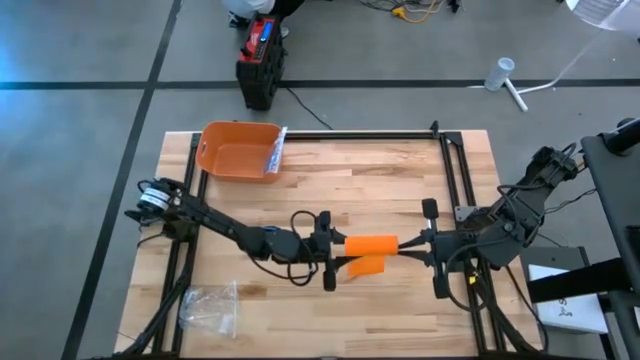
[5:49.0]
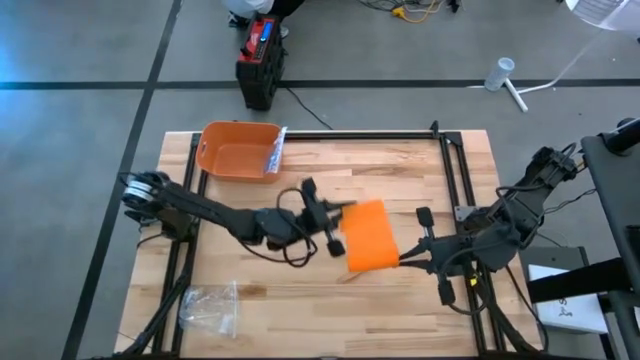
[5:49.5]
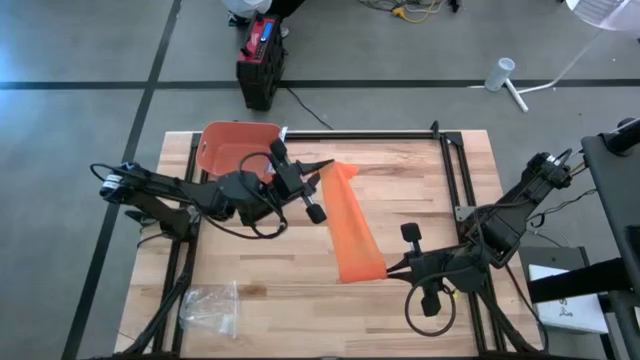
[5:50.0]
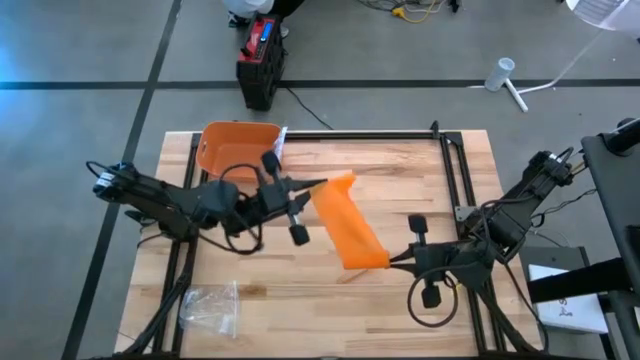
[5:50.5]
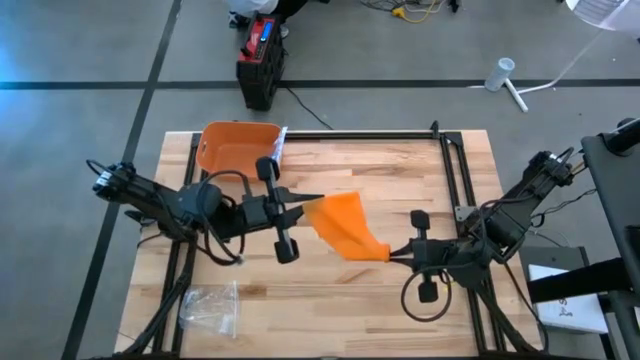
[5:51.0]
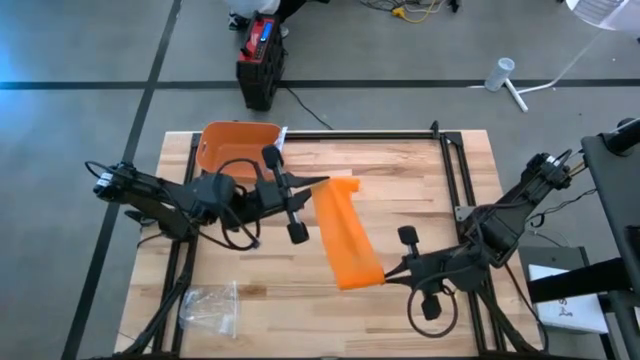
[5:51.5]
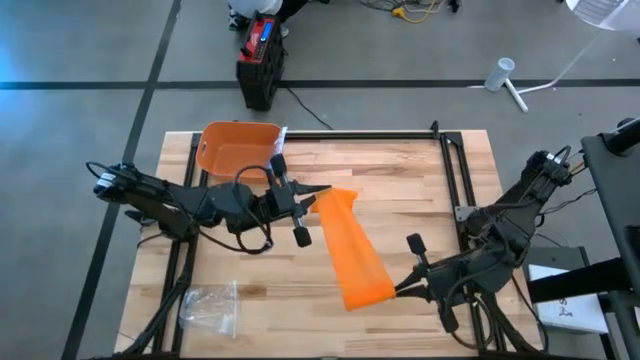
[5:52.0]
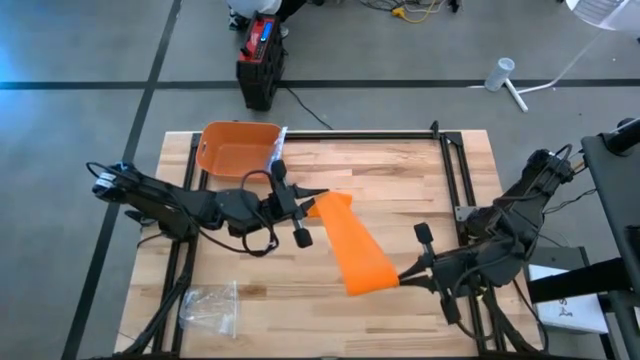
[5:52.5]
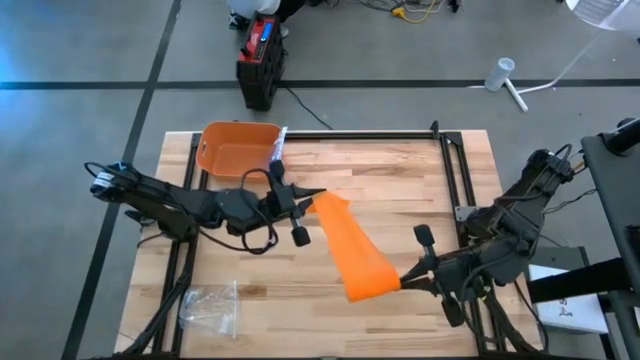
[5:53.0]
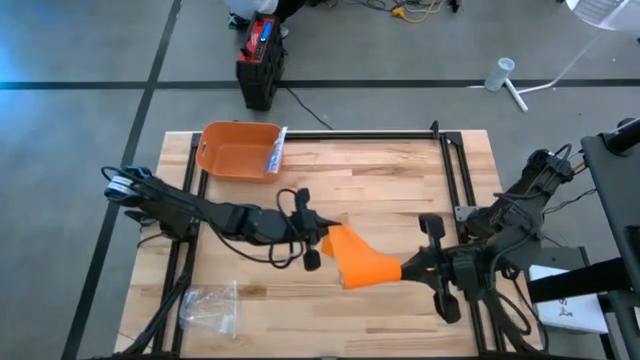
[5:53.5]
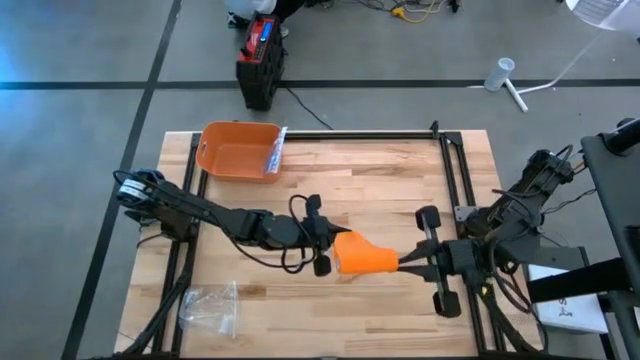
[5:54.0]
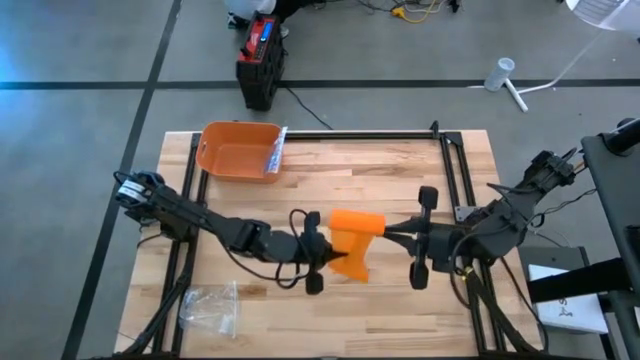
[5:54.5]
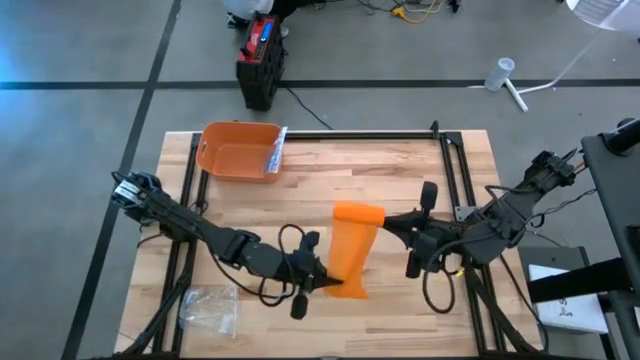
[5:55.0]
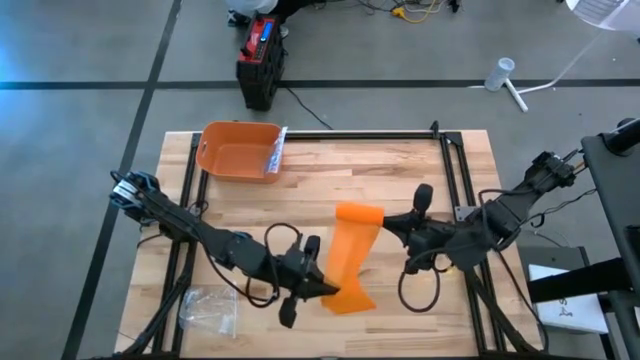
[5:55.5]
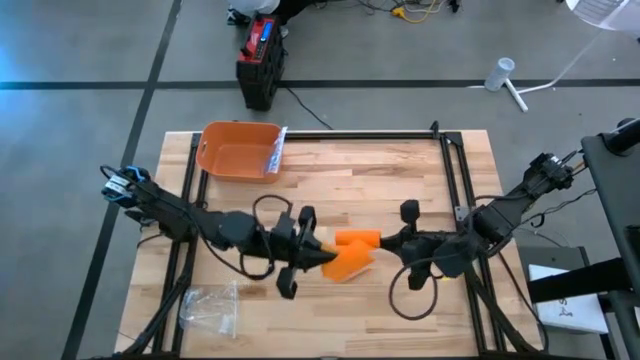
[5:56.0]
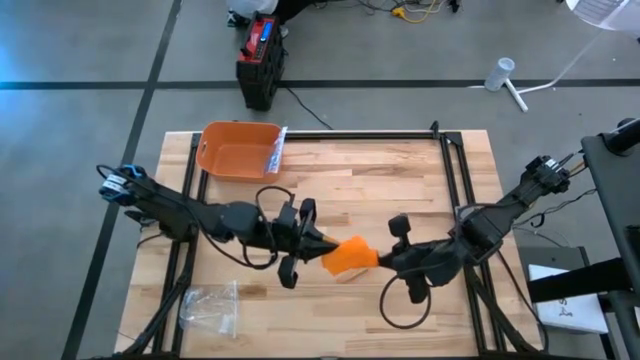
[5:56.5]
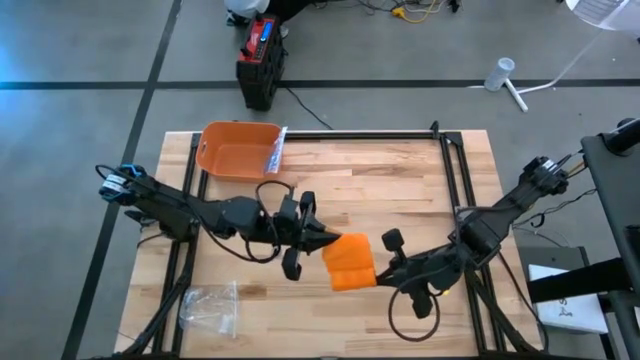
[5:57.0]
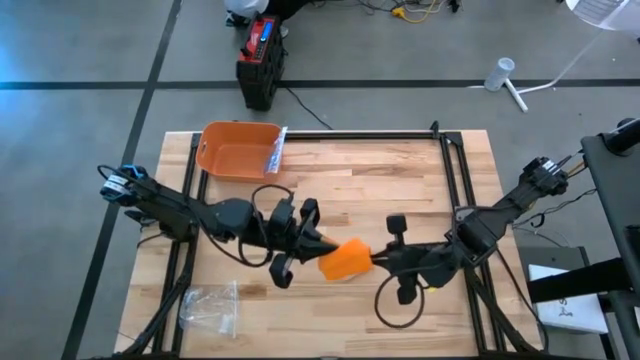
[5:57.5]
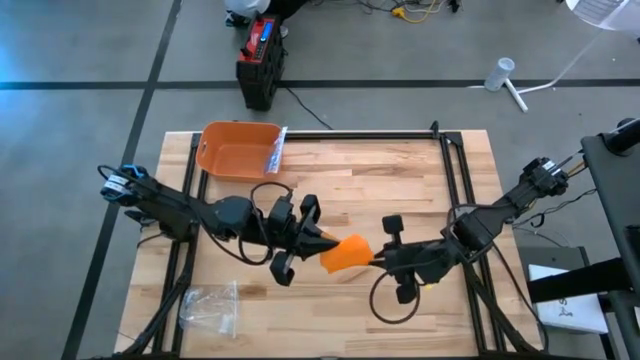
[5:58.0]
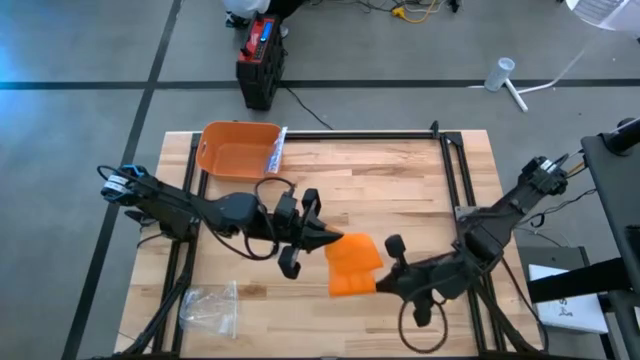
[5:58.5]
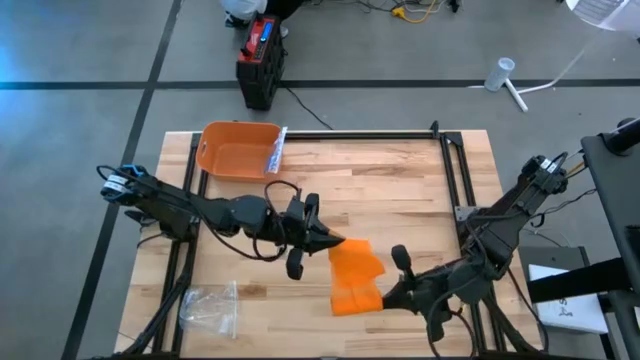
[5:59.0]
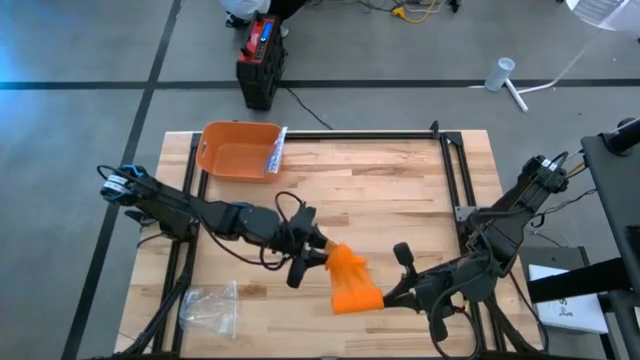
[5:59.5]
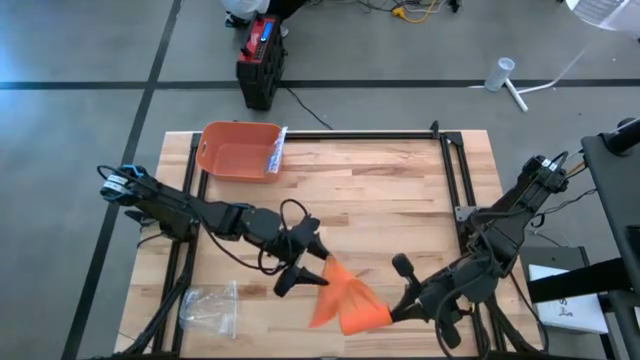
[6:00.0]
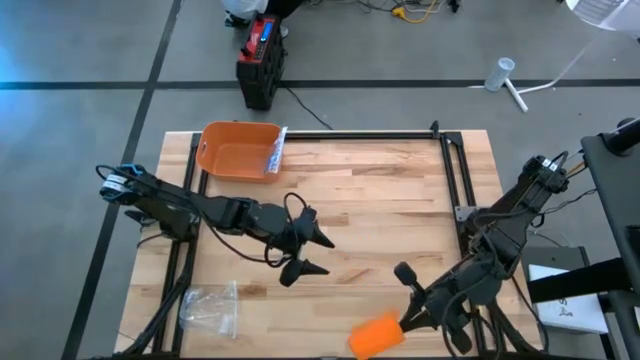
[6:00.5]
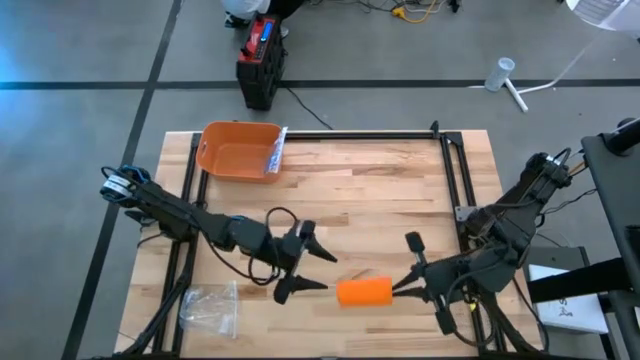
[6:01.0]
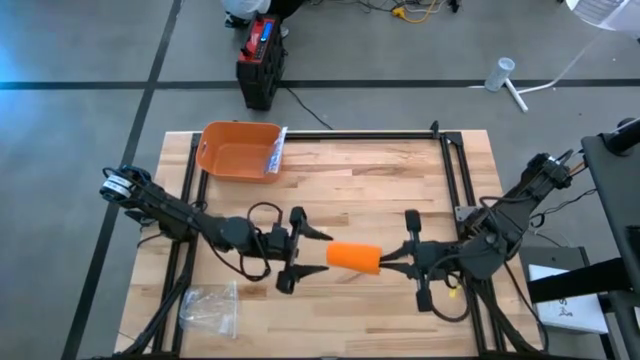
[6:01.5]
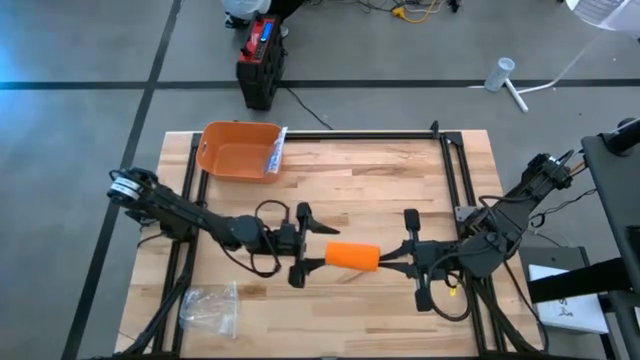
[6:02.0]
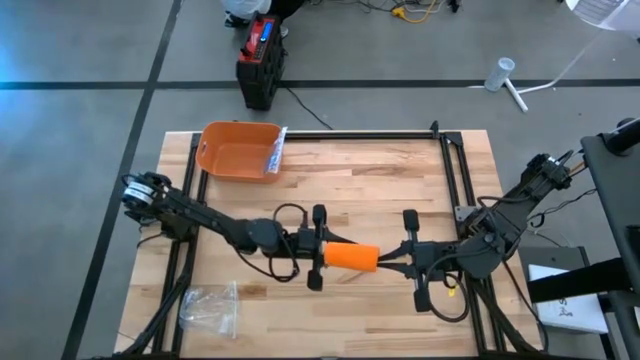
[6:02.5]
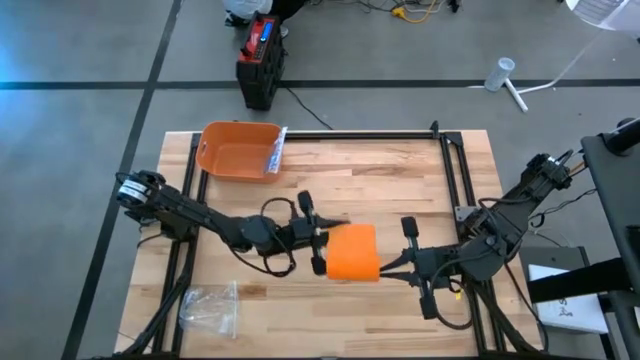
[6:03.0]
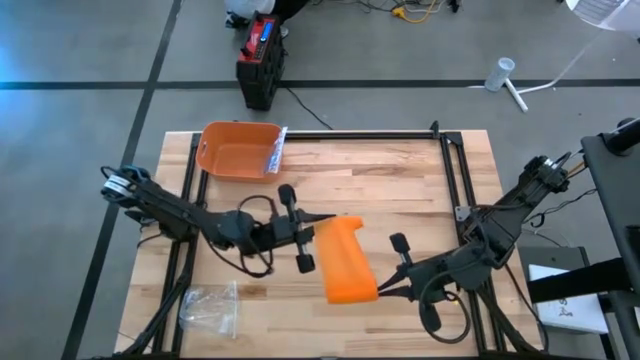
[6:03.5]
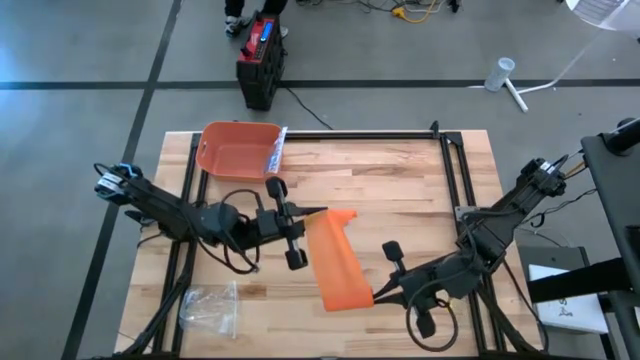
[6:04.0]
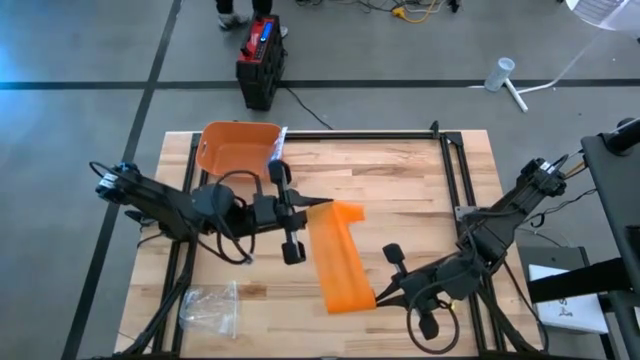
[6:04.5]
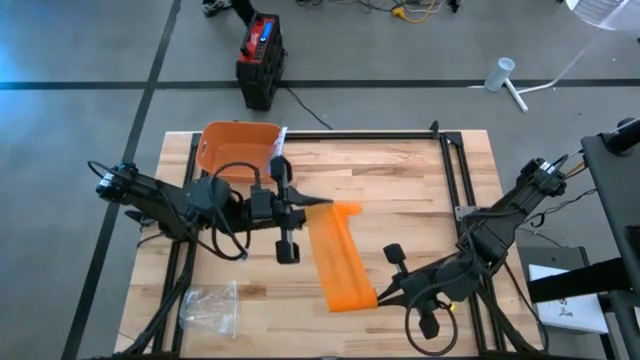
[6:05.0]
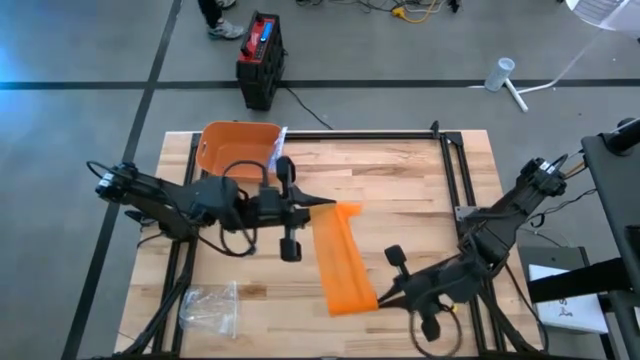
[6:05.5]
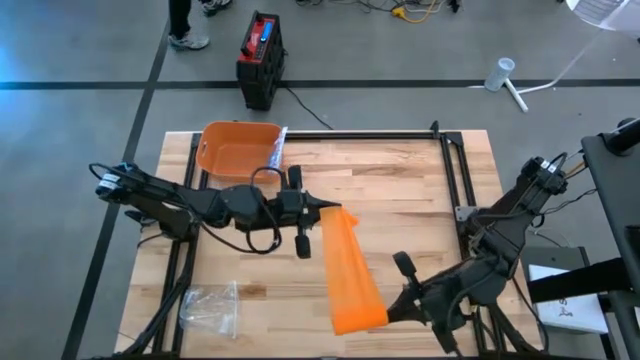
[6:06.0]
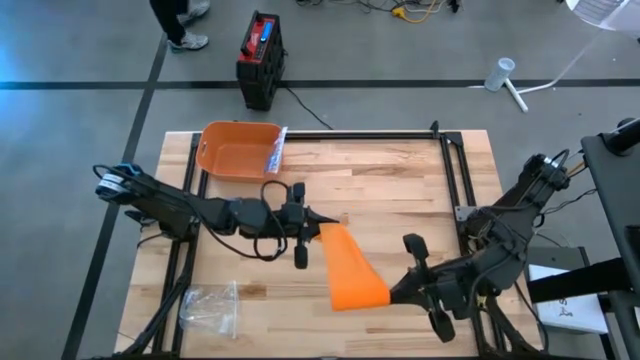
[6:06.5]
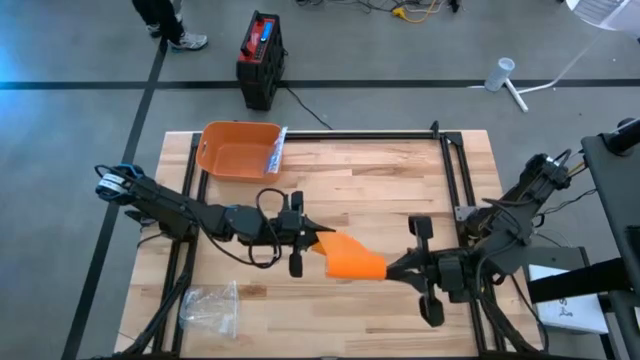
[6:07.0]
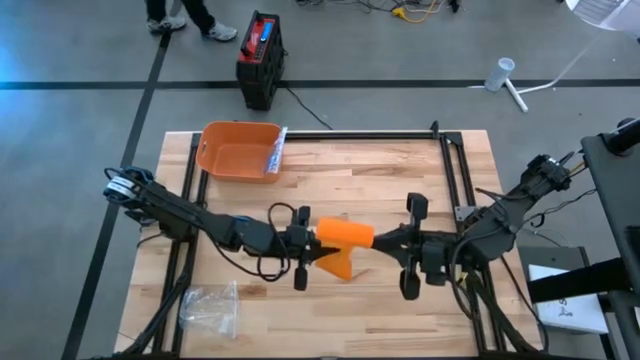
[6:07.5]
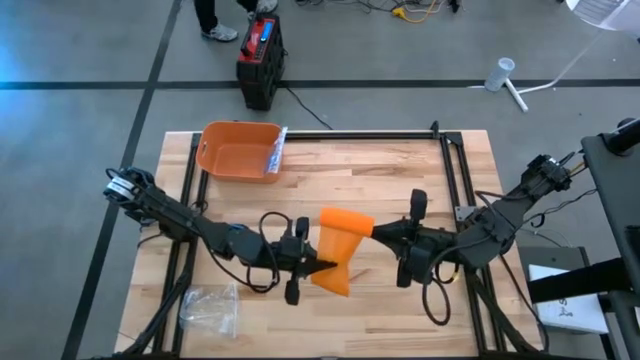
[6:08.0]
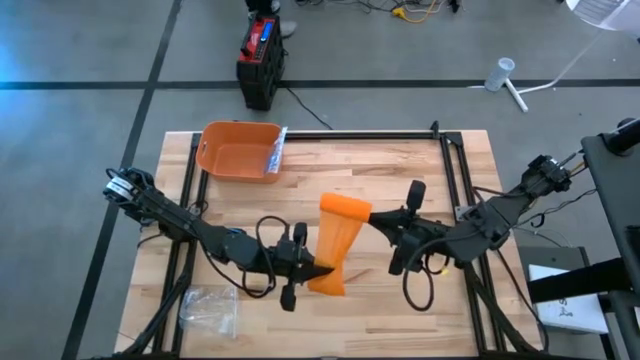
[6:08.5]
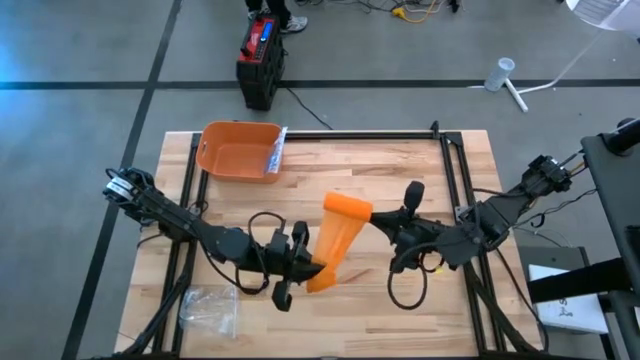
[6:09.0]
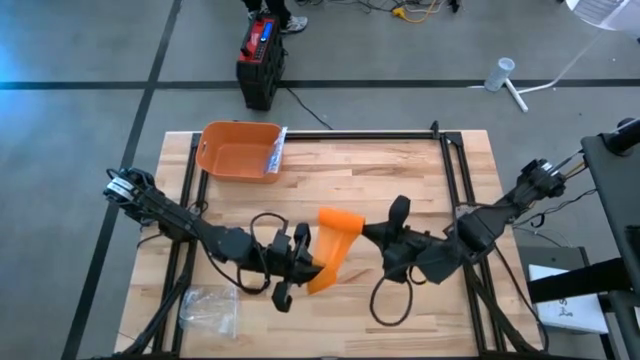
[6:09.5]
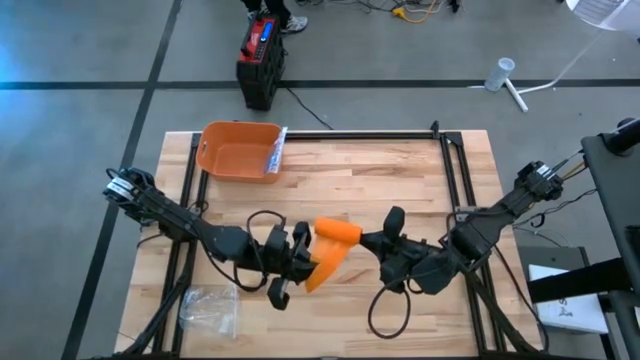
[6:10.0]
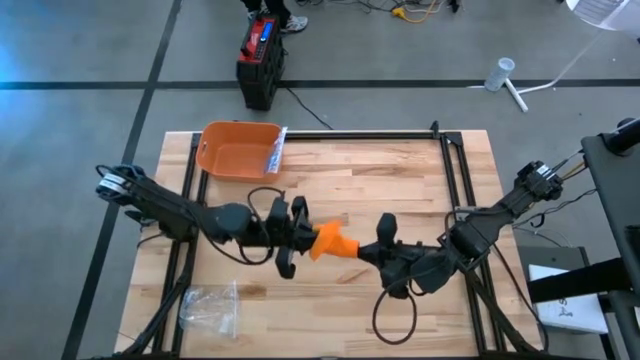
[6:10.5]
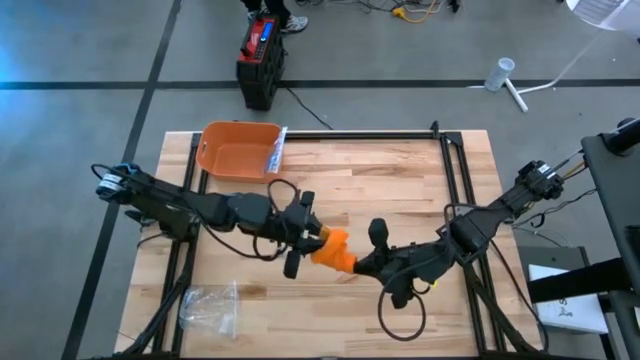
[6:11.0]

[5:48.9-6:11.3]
Task: Roll bandage
Roll the orange bandage
